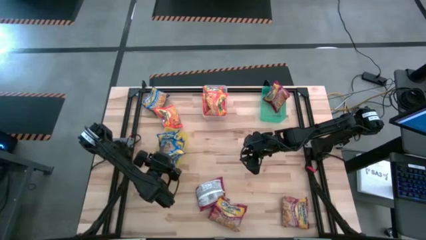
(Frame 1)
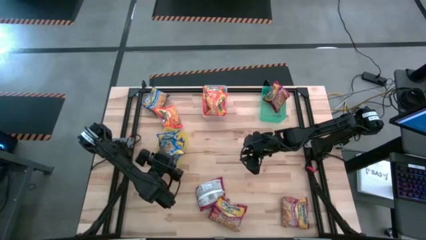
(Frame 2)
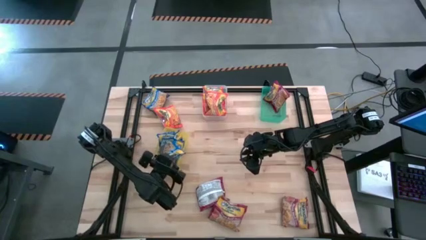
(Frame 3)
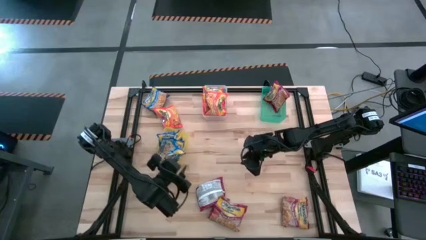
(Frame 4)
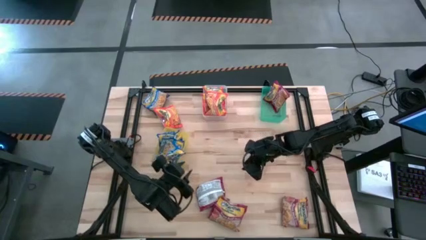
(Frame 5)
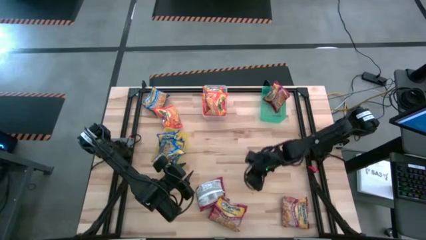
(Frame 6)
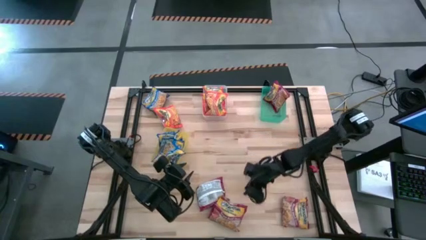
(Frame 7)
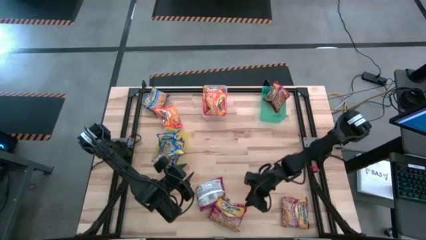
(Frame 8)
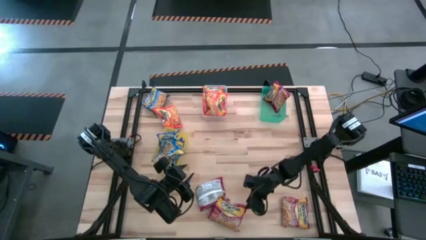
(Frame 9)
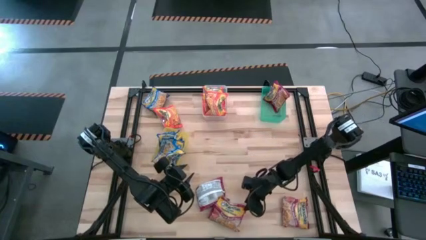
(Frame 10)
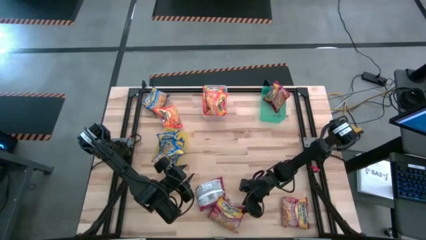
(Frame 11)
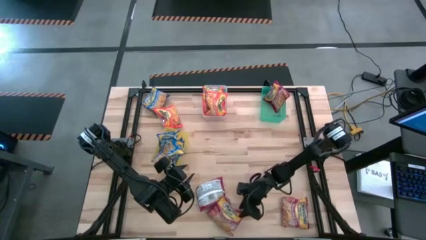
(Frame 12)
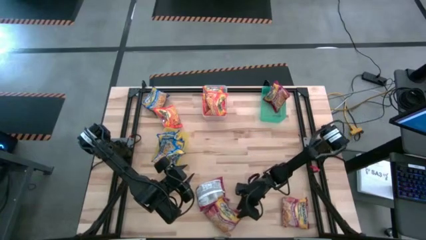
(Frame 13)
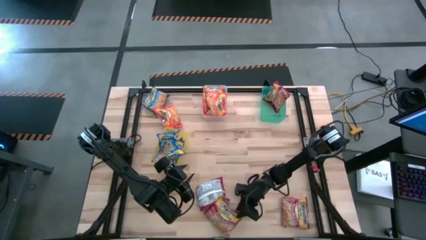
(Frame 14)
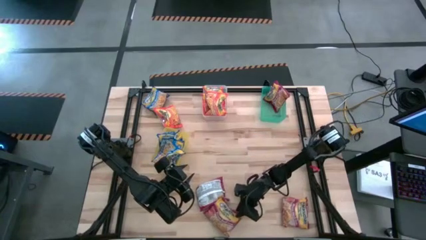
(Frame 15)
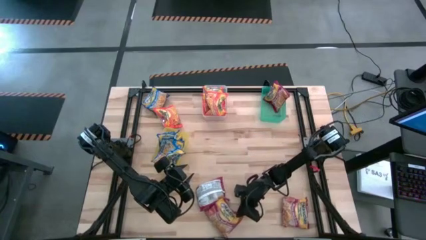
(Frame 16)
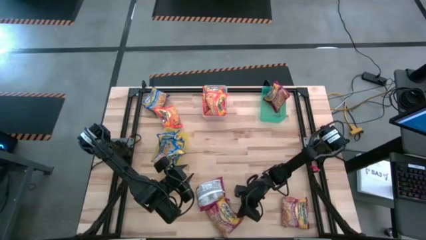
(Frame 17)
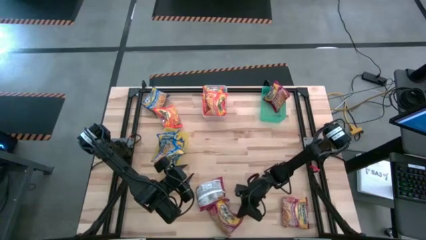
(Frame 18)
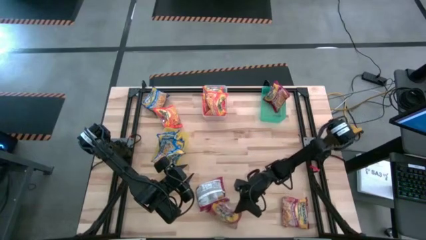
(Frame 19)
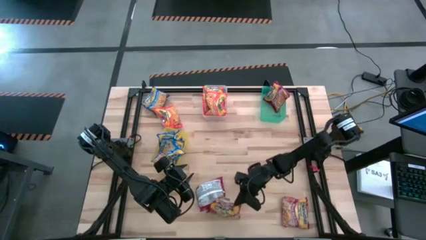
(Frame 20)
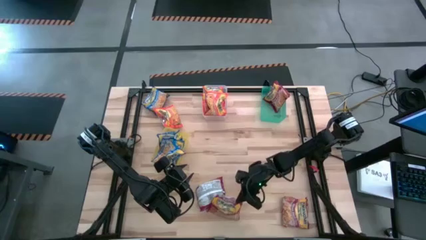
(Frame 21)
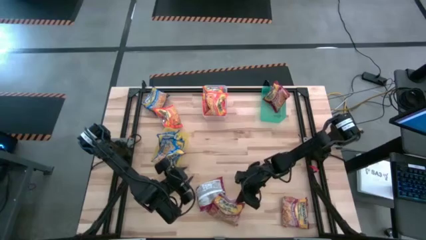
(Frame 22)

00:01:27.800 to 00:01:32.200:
Task: Sort Maruchan noodles
Put the red noodle pack into the green bin

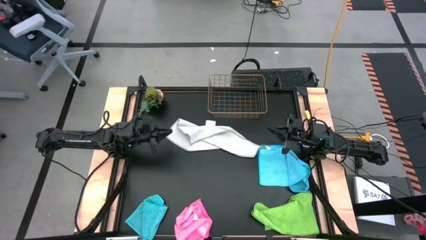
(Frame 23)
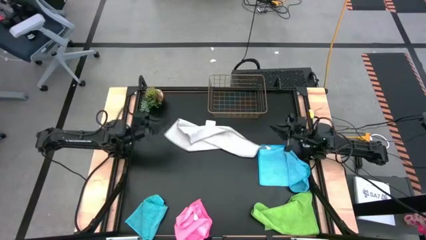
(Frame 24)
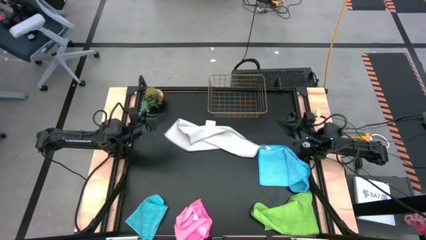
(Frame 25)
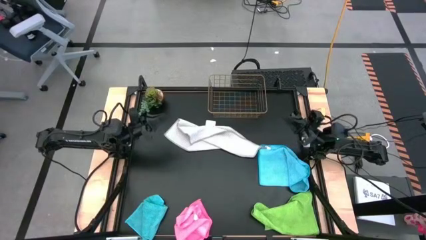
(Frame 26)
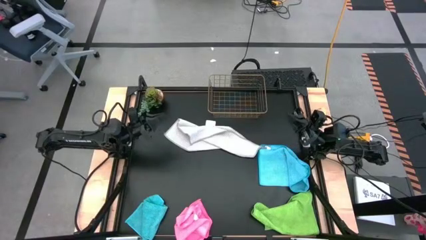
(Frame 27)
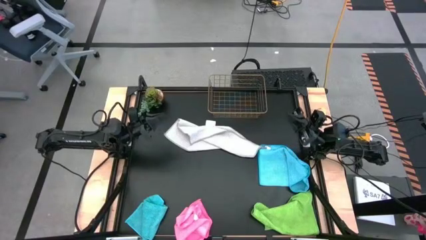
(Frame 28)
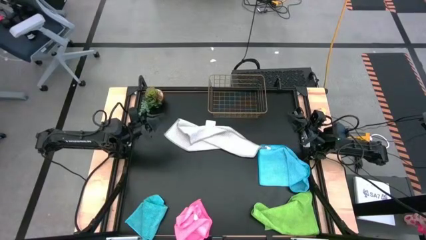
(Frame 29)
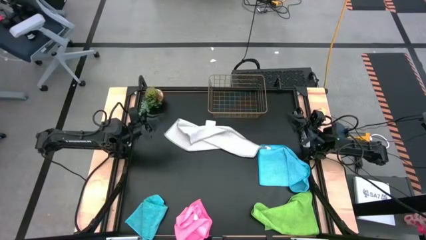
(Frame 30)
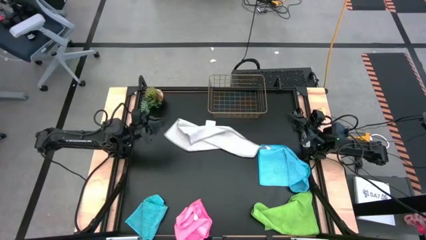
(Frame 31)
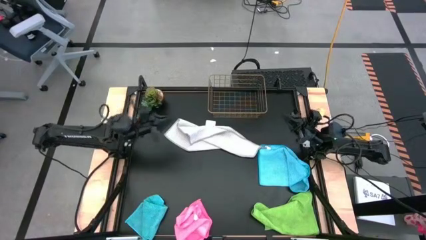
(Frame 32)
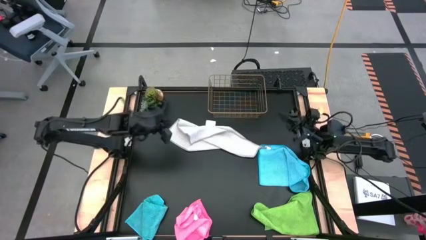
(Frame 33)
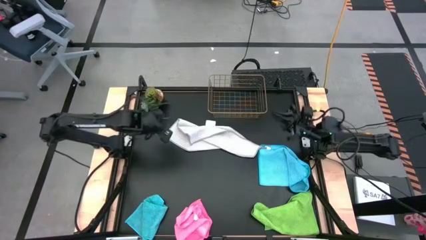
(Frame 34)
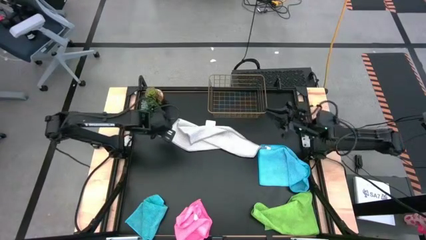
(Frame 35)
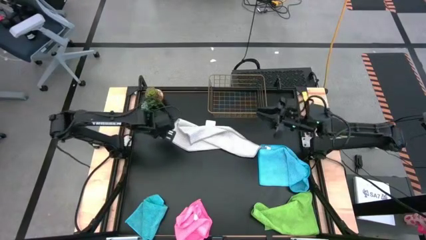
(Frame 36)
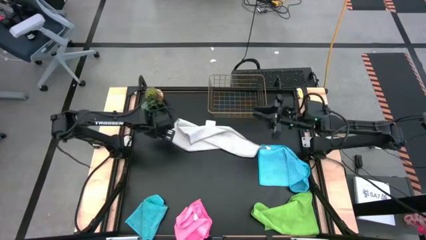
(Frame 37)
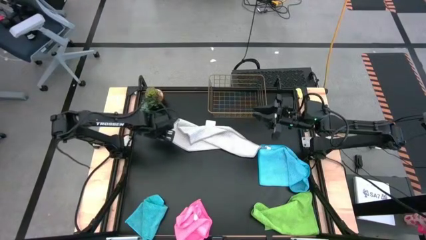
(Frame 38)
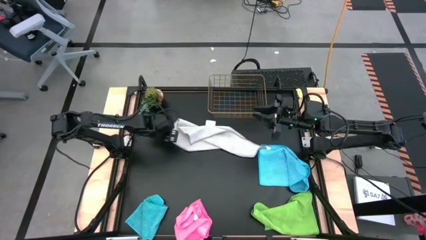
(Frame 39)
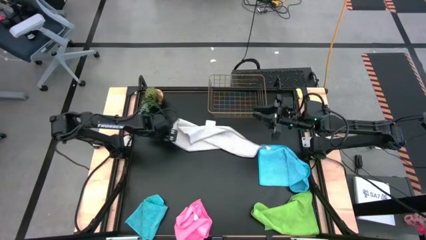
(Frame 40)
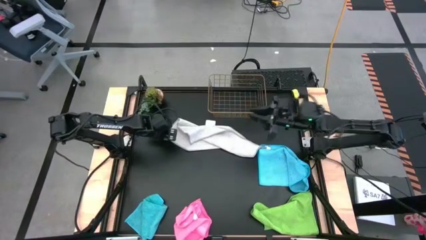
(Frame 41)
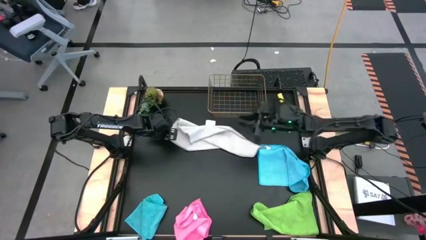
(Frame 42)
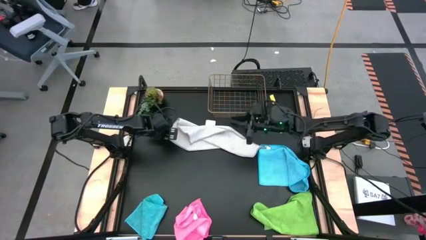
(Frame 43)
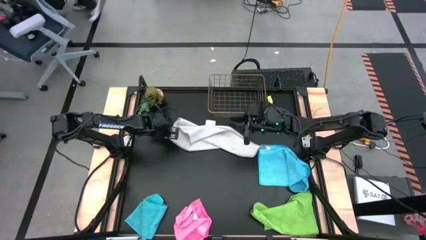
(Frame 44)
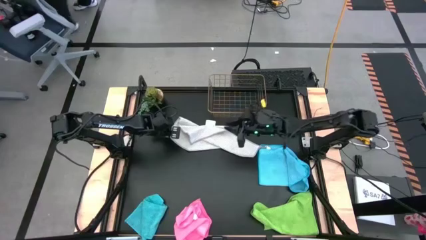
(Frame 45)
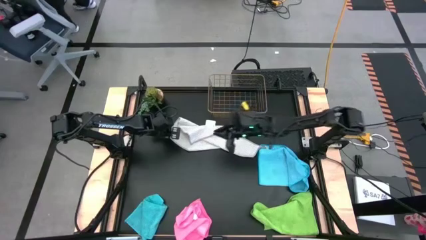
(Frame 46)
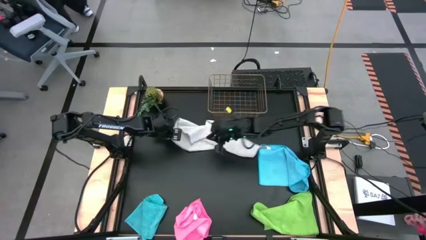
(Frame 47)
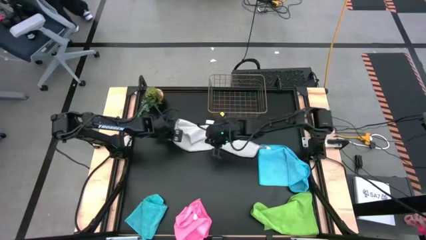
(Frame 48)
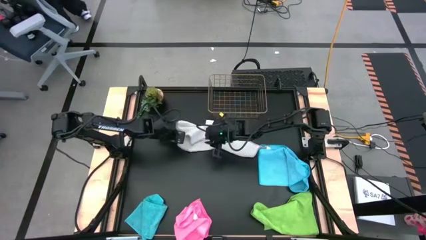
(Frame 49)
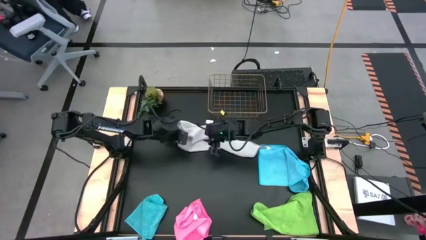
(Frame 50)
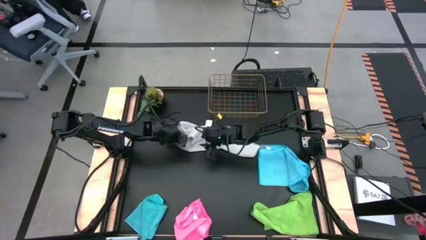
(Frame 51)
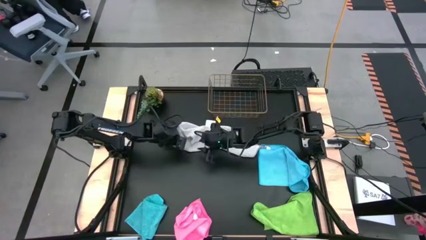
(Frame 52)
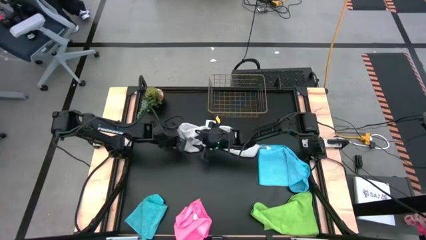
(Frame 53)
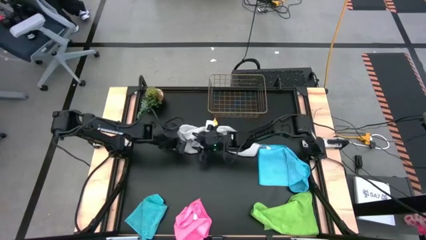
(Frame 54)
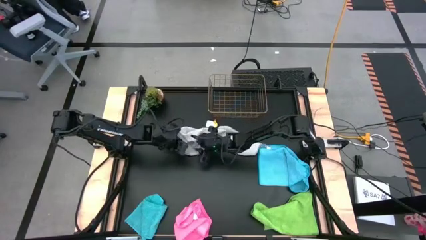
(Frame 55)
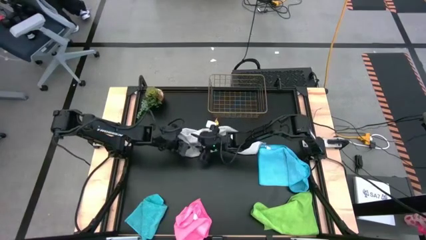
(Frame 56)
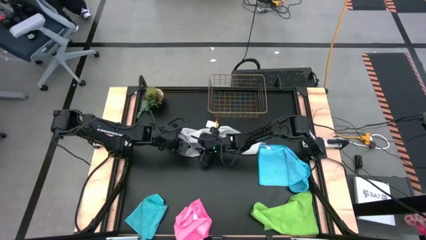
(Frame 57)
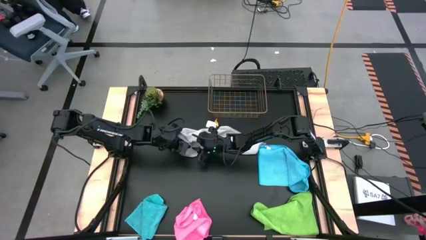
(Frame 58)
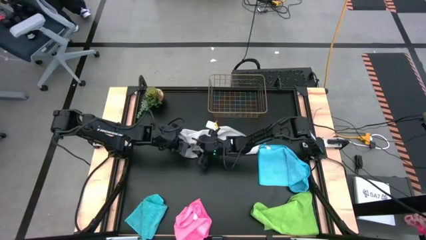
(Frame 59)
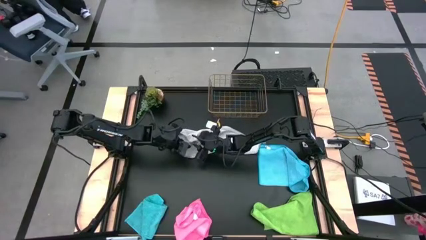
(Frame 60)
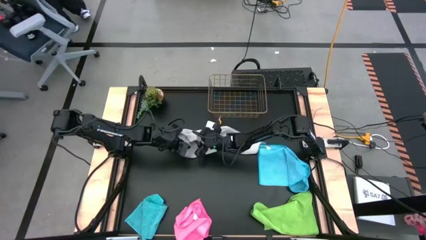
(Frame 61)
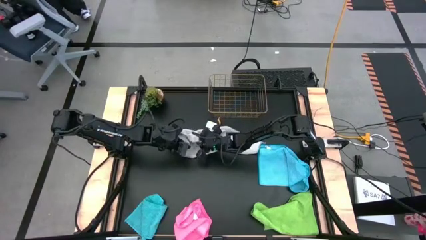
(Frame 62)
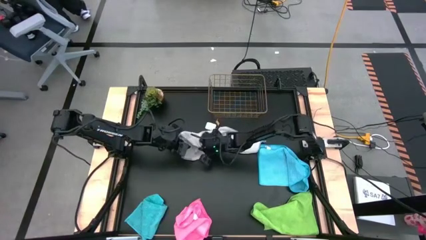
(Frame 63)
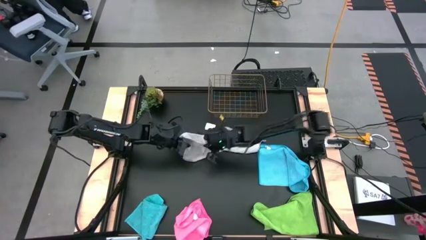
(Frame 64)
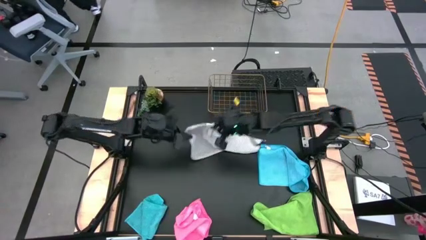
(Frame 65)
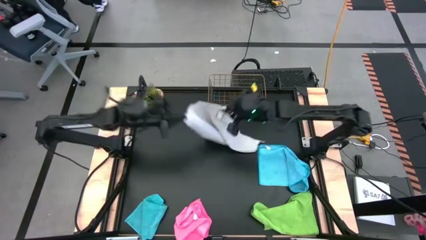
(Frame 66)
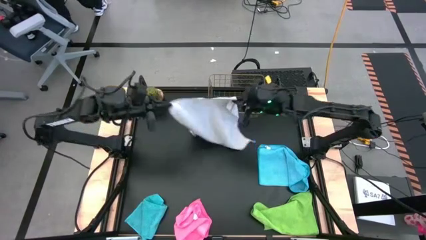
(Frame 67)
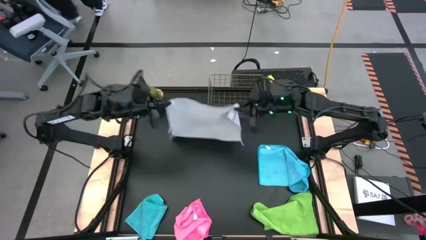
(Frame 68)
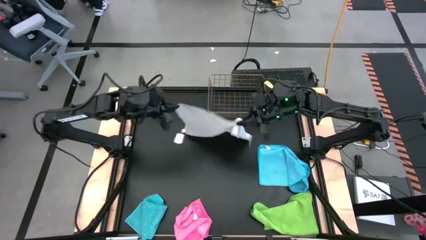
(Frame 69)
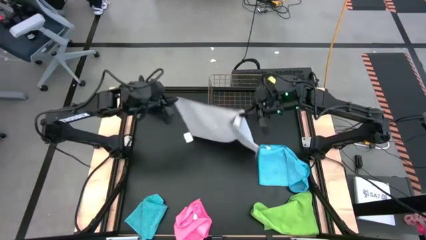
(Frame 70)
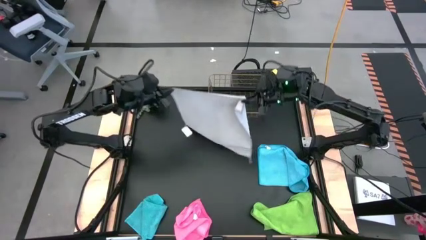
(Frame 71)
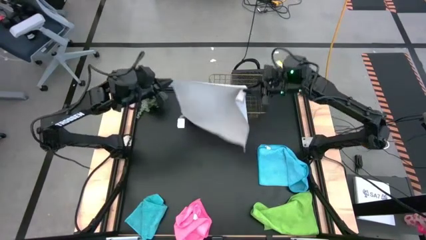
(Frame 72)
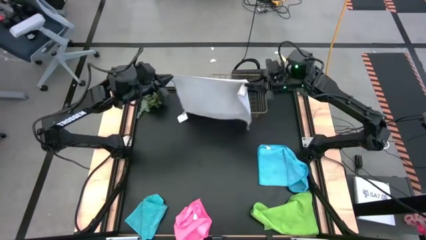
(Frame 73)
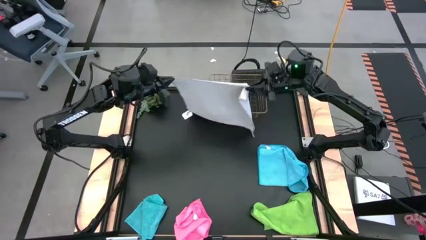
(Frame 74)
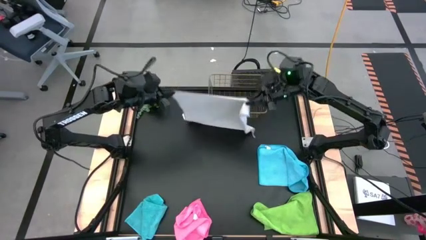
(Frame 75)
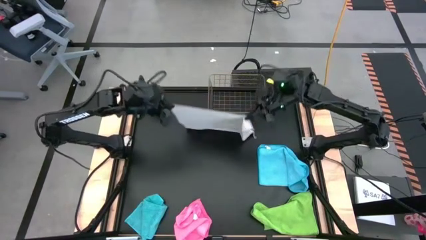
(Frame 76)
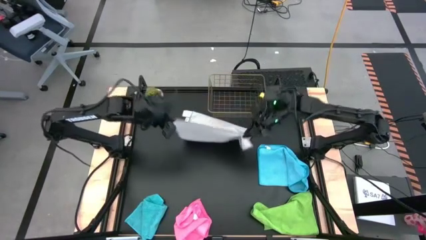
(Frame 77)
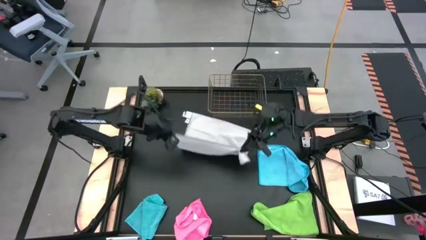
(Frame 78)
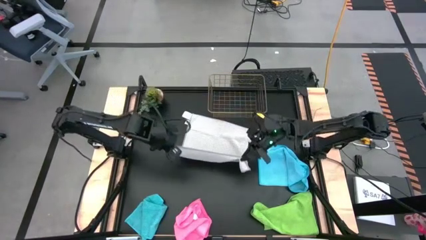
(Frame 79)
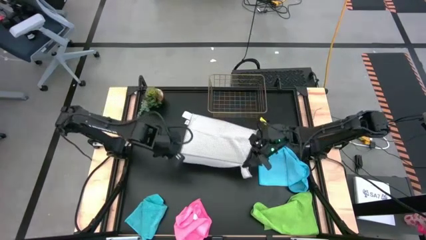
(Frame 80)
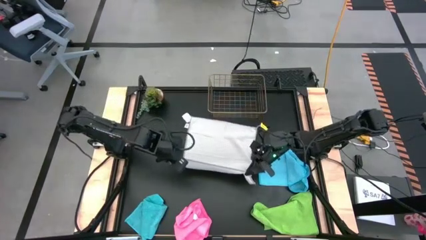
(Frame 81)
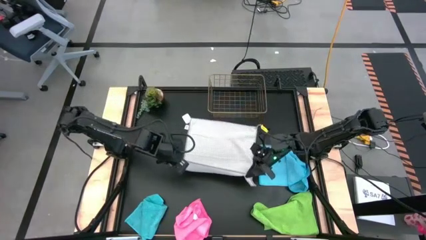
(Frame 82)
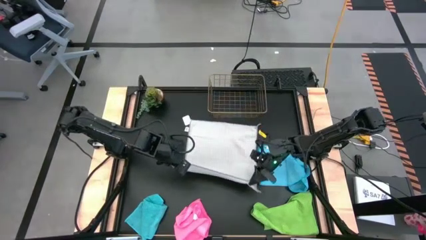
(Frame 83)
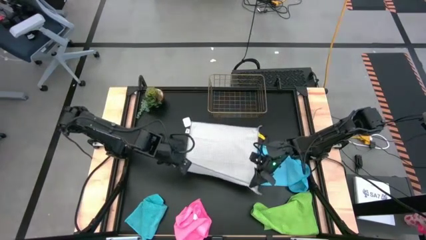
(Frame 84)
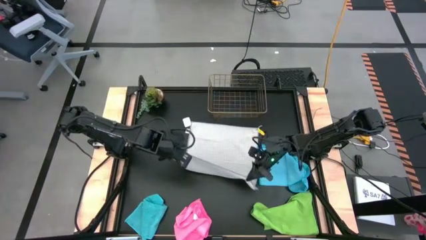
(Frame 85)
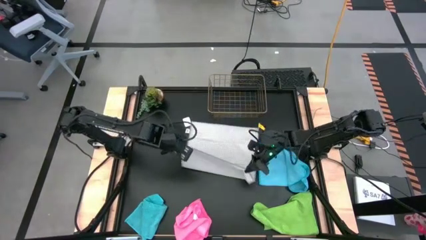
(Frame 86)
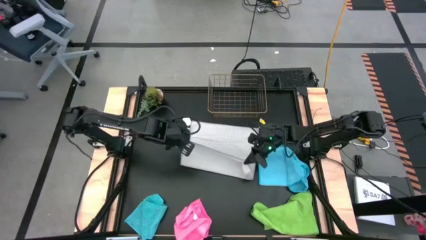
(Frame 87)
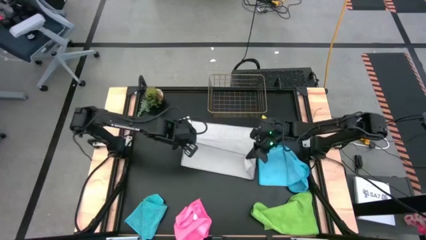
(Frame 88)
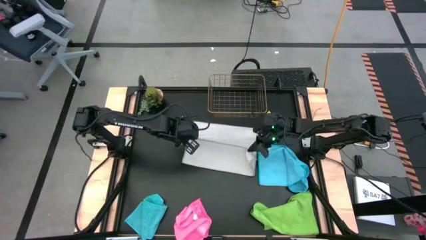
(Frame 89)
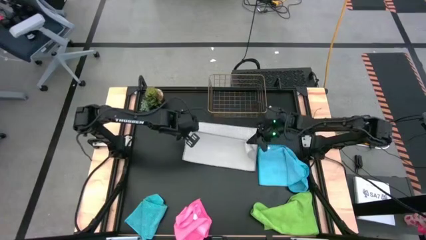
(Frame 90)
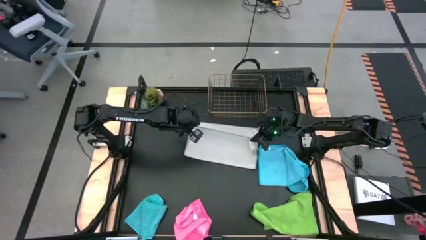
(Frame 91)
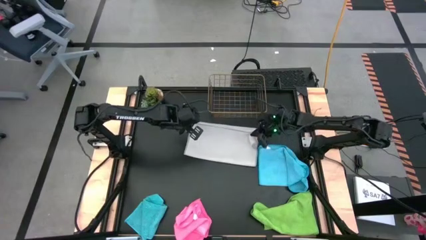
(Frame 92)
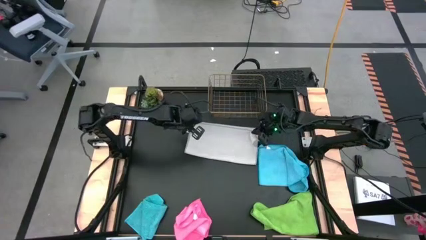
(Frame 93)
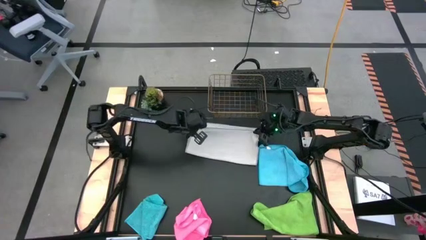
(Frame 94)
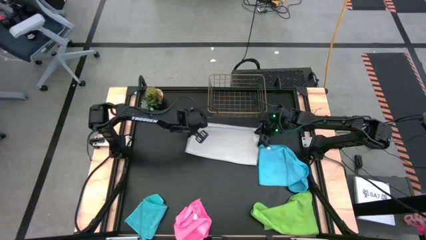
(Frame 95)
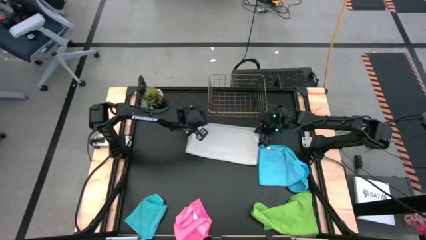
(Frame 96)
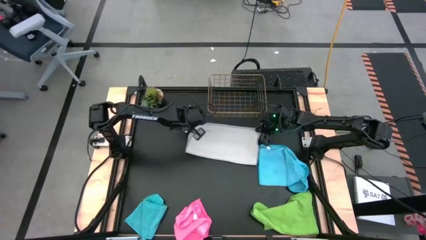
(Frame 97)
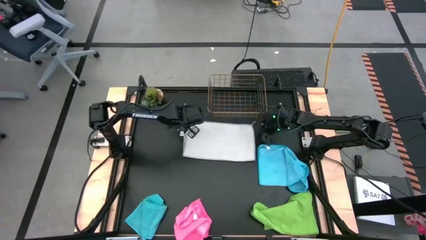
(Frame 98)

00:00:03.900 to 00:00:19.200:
Task: Fold microfiber towels
Fold the gray towel
